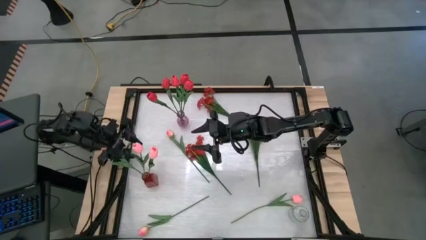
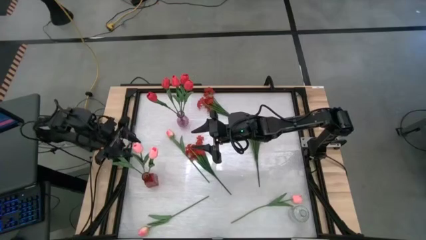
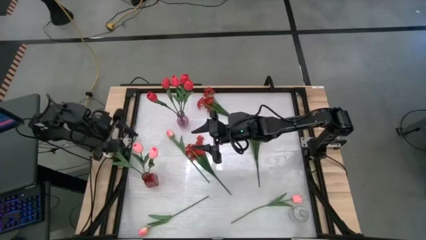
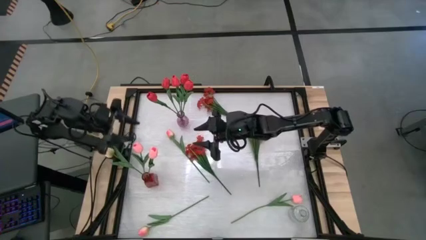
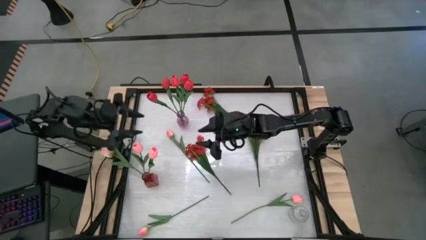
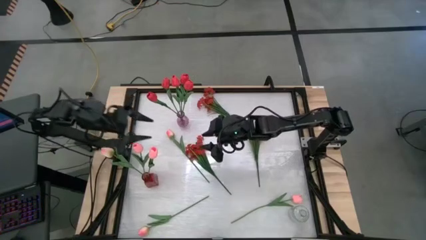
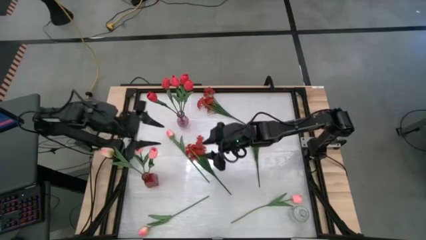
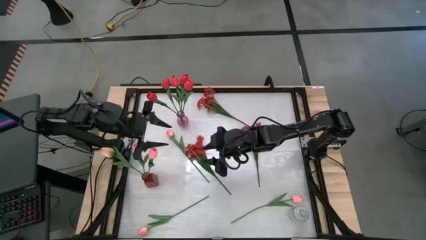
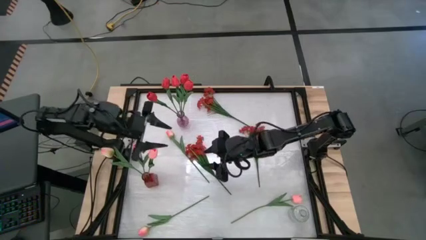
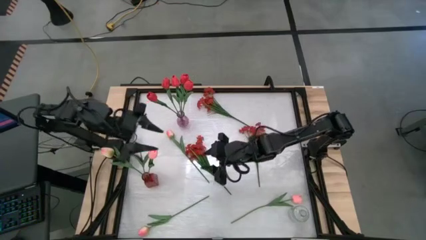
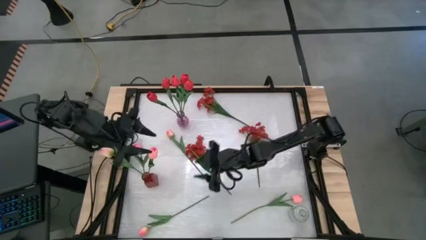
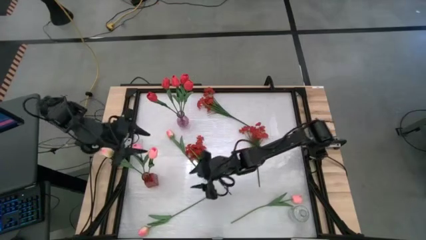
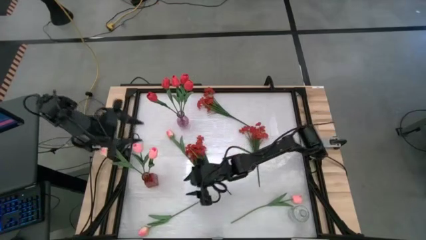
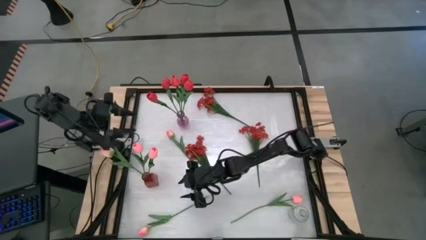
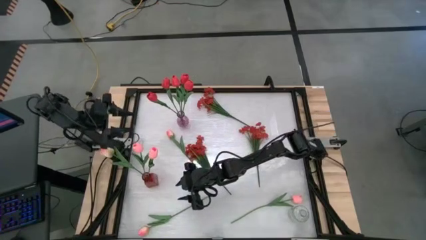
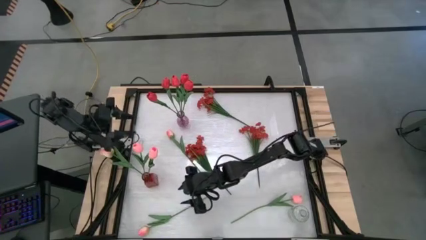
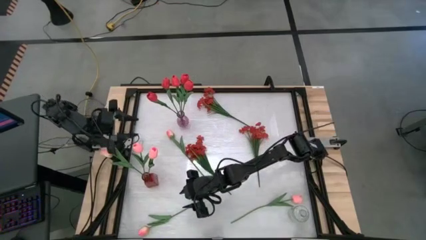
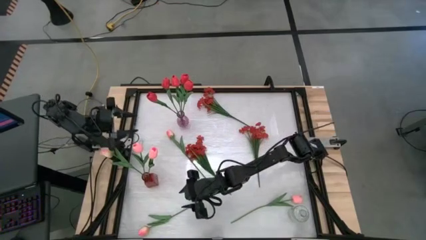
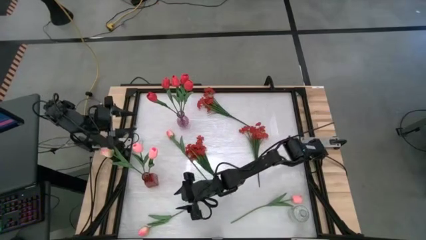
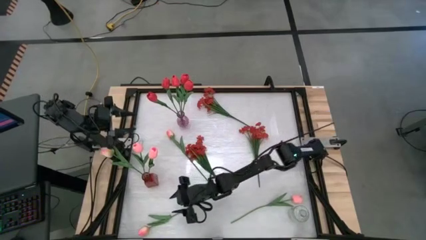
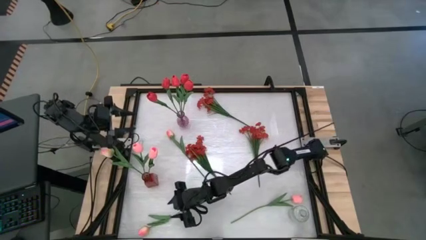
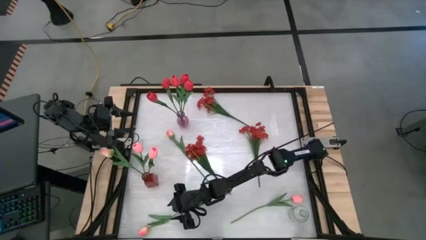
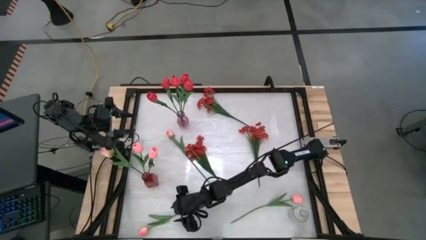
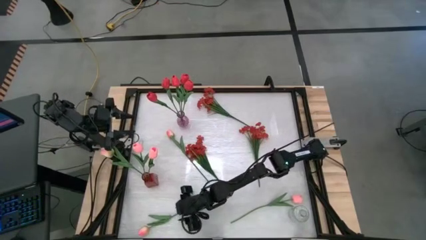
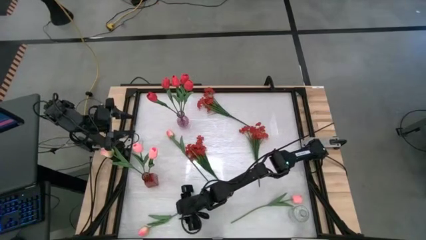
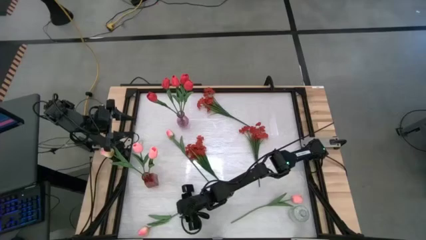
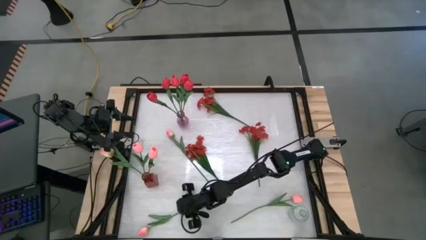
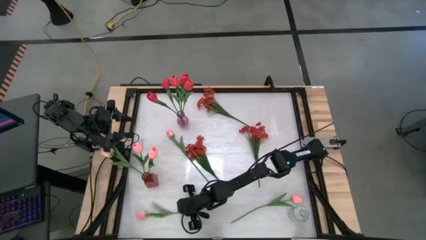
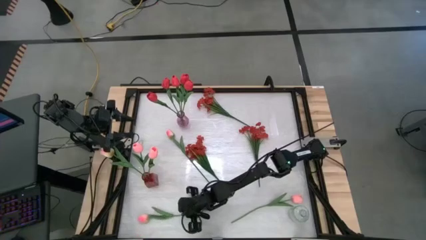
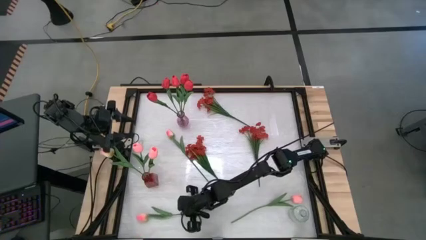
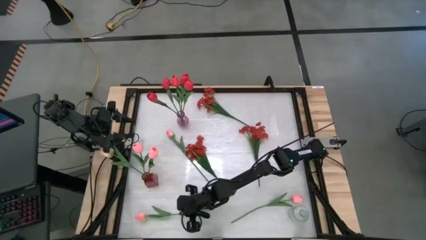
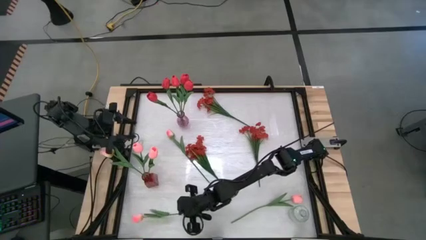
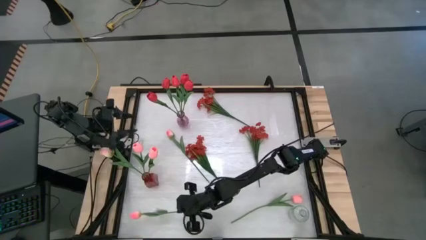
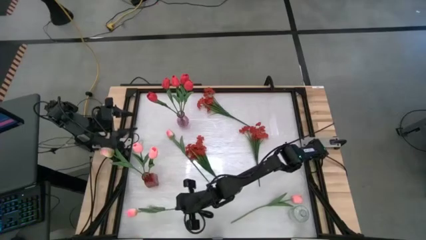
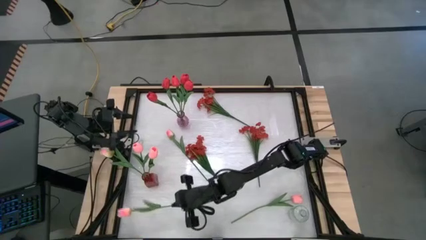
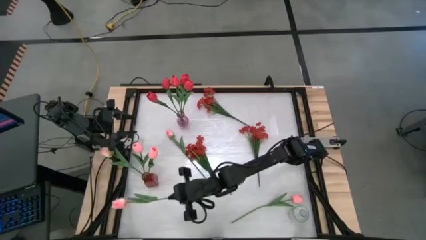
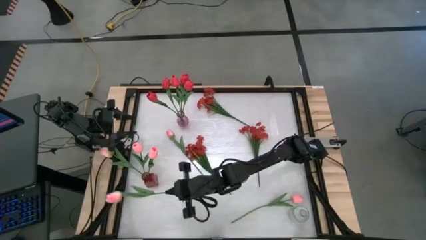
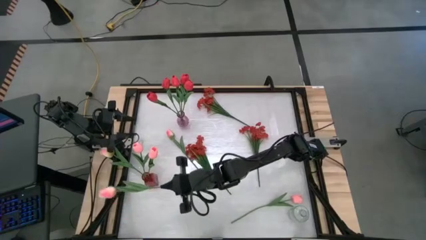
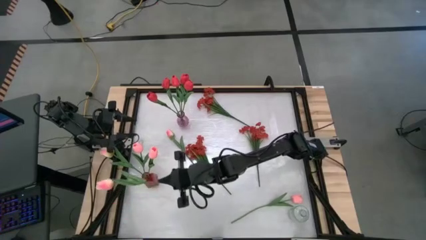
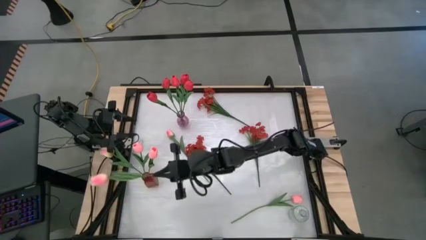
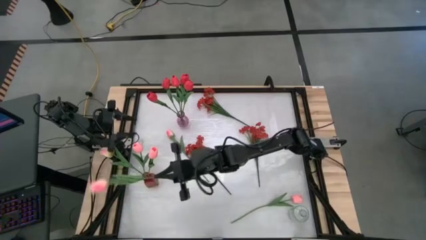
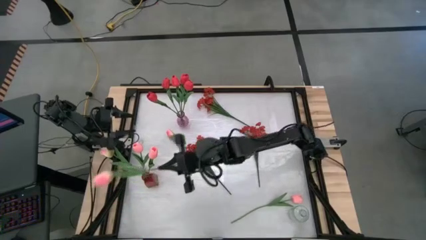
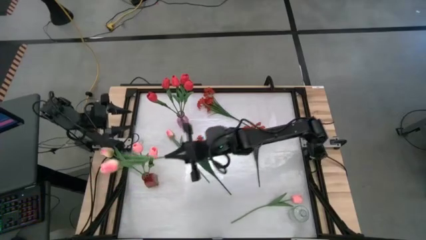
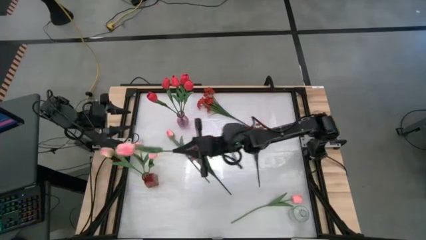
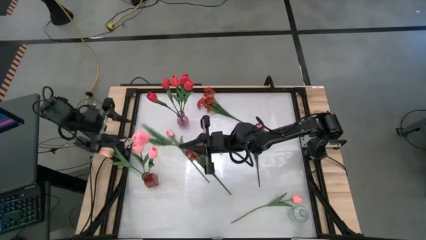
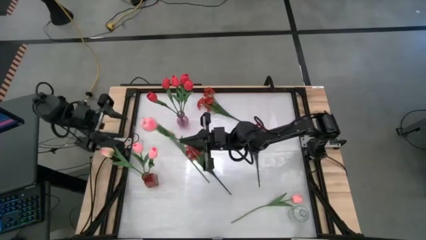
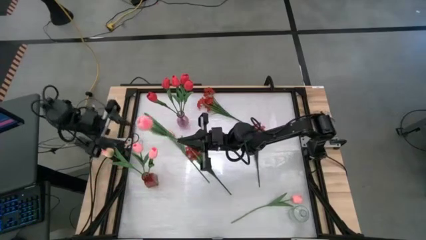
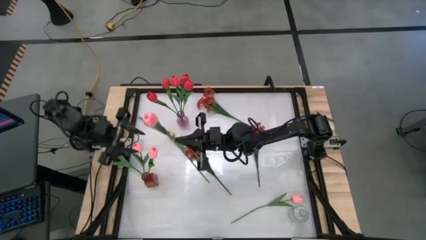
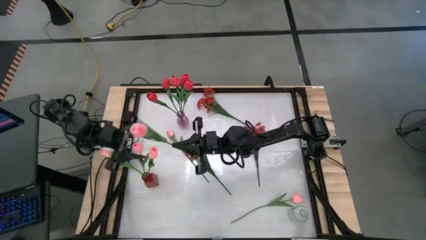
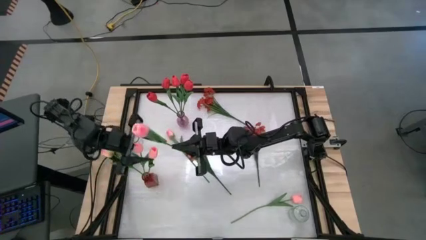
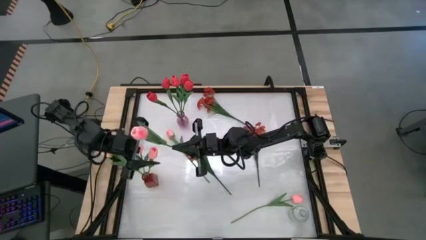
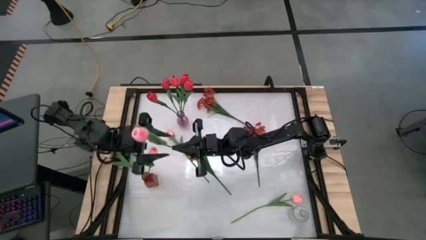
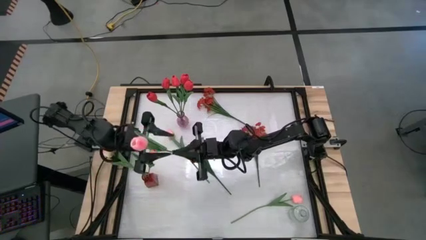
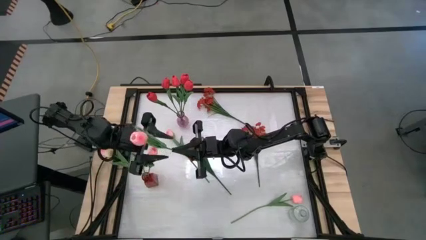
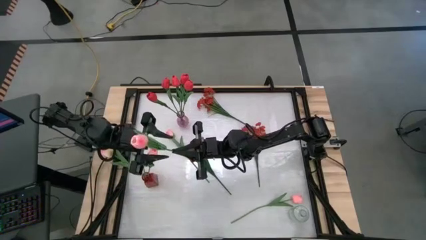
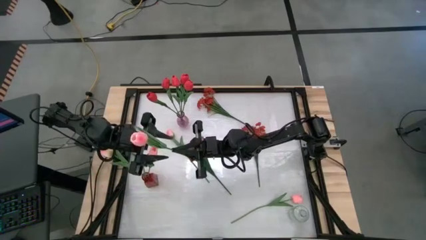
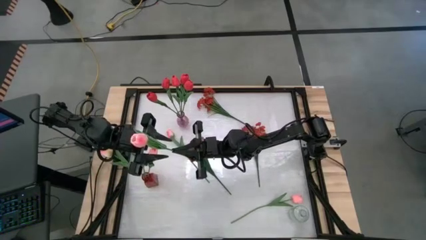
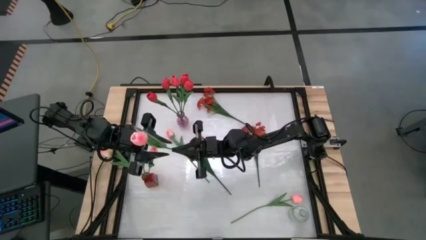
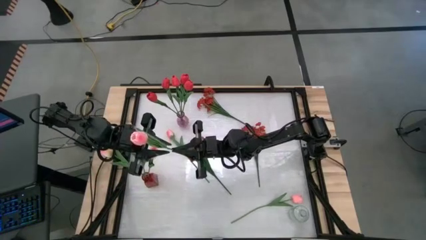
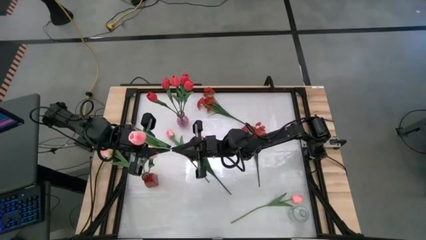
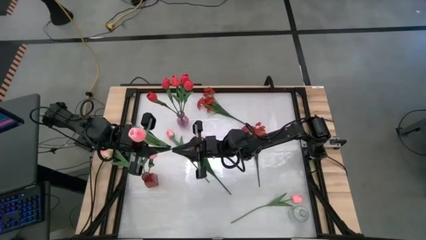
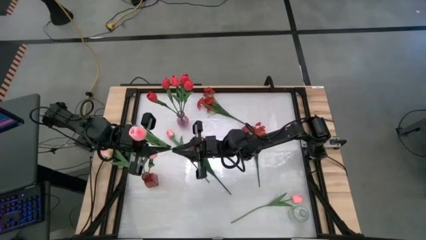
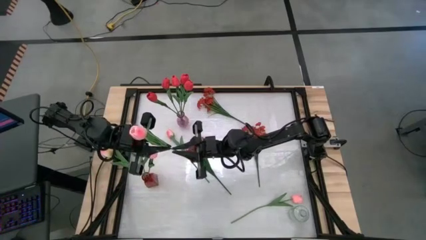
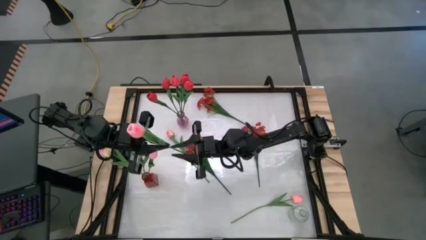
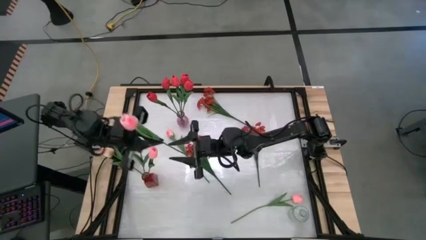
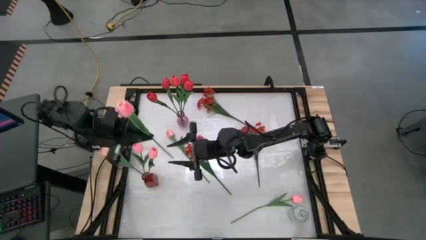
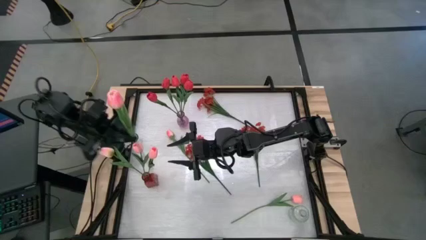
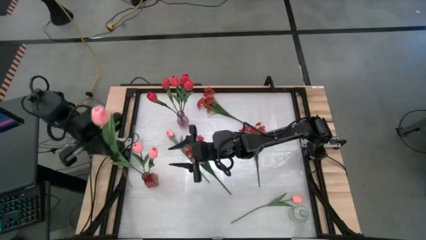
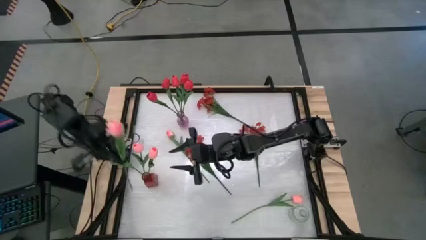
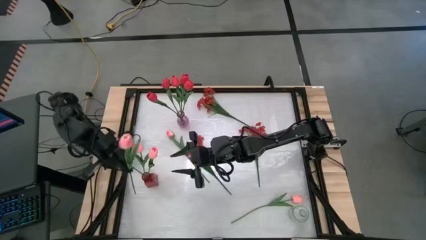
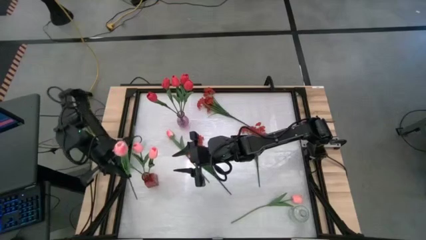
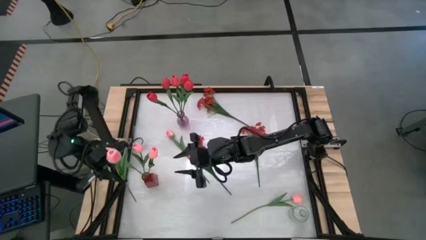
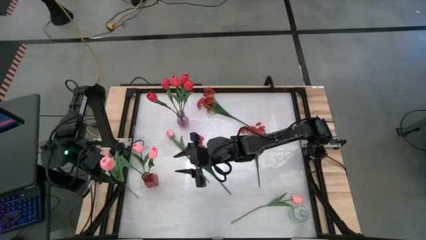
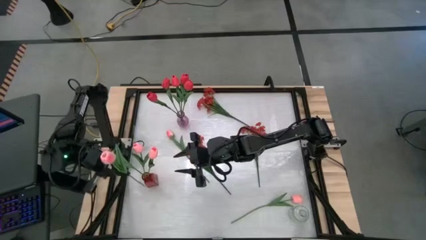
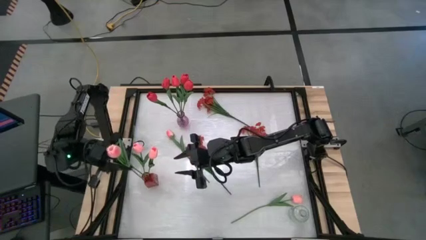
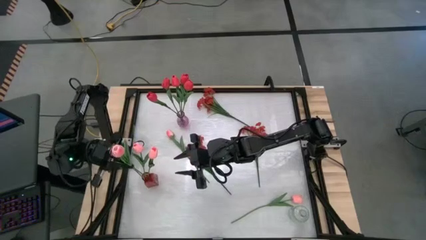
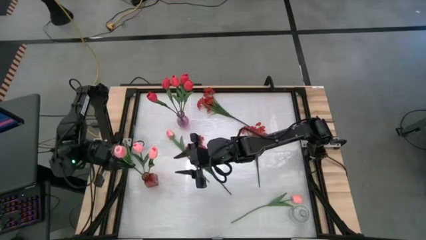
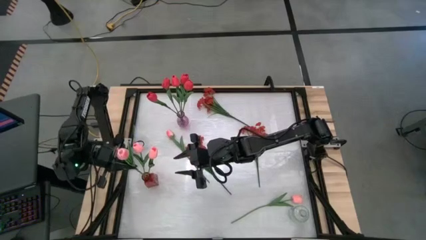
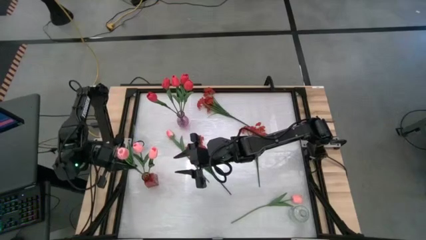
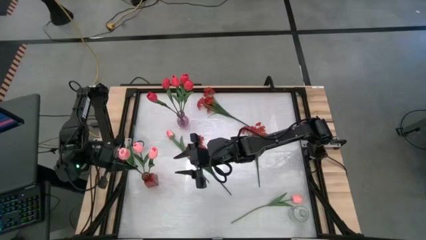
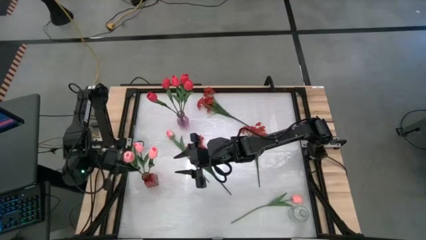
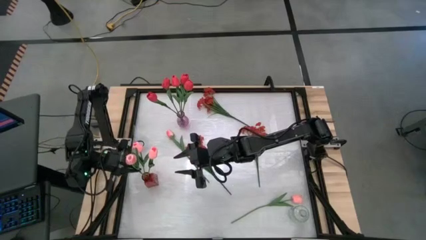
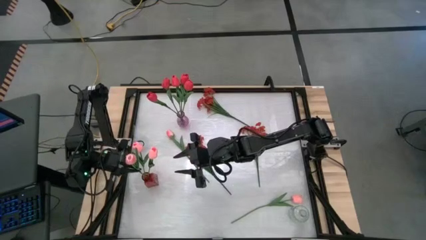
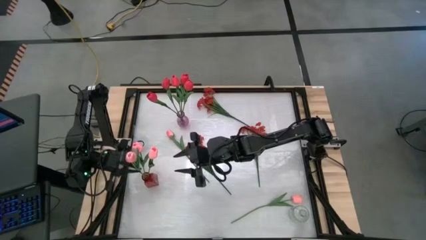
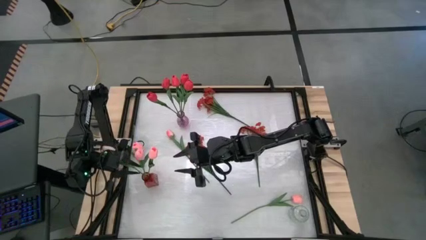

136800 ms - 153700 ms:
Task: Sort flowers into vase by color
Put the pink tulip into the red vase
